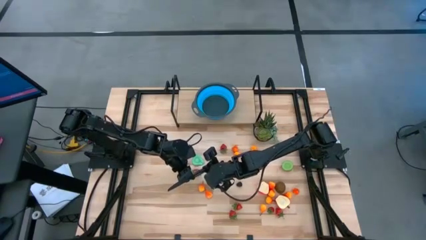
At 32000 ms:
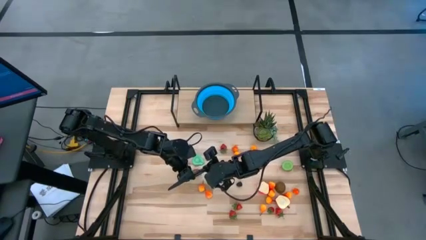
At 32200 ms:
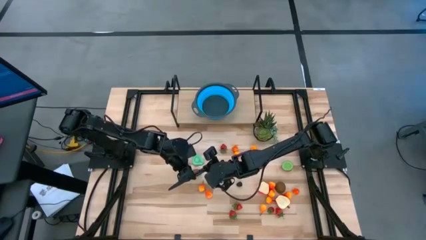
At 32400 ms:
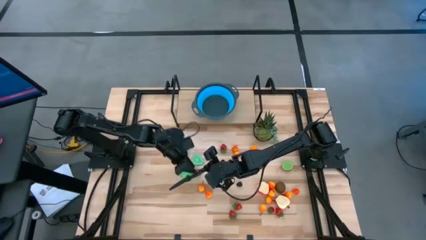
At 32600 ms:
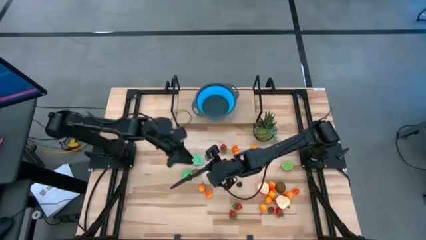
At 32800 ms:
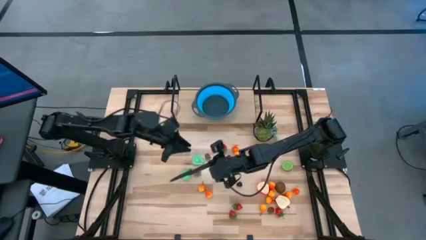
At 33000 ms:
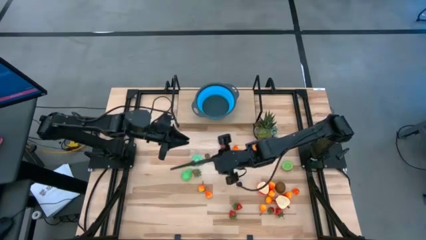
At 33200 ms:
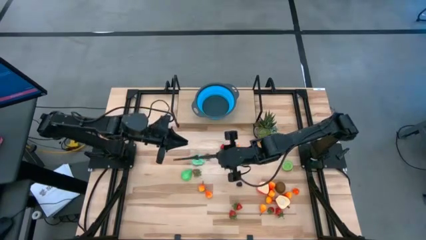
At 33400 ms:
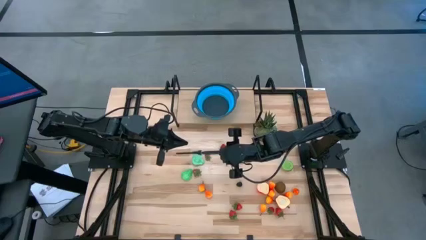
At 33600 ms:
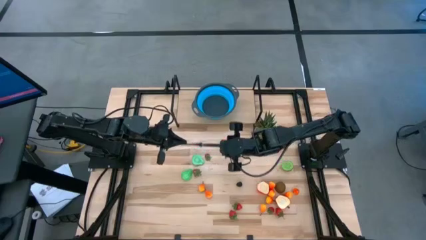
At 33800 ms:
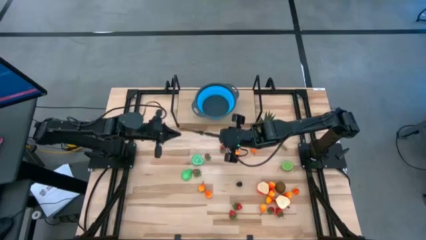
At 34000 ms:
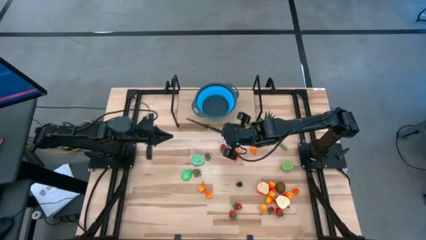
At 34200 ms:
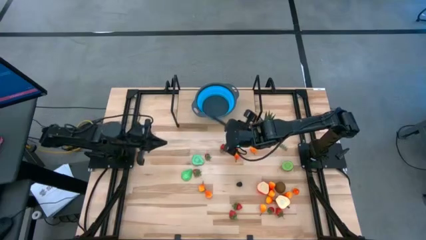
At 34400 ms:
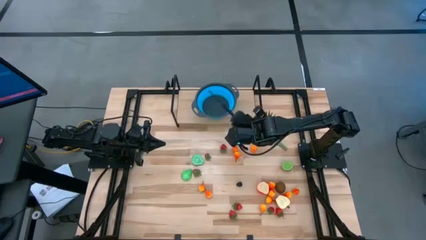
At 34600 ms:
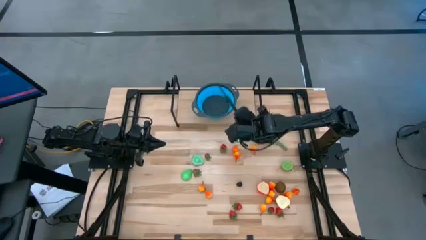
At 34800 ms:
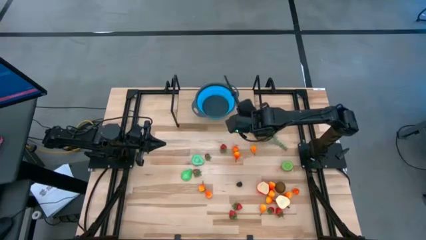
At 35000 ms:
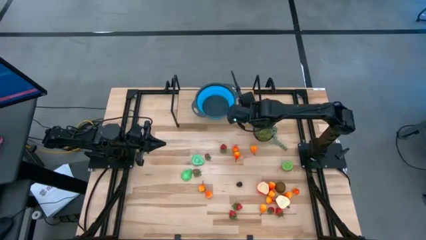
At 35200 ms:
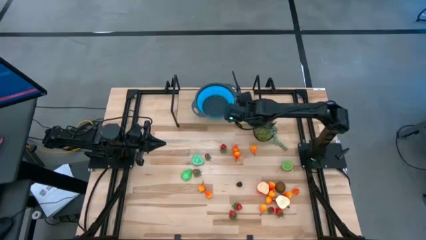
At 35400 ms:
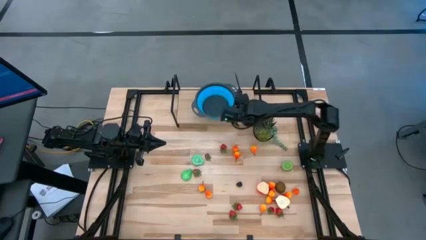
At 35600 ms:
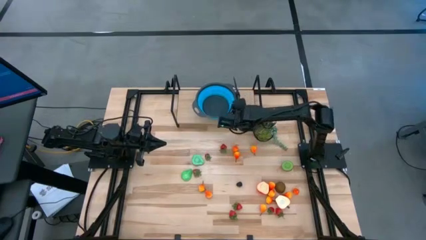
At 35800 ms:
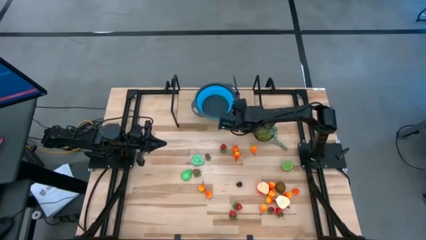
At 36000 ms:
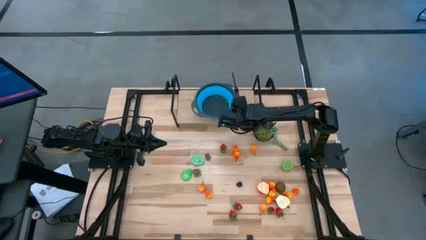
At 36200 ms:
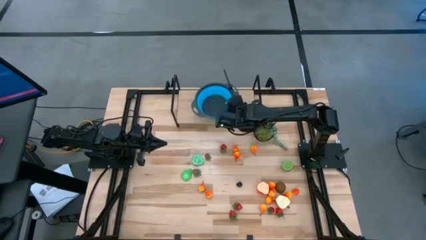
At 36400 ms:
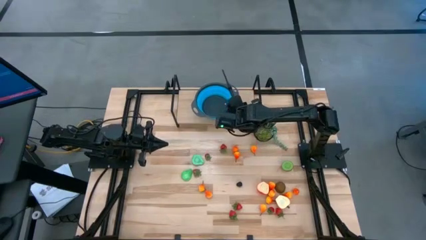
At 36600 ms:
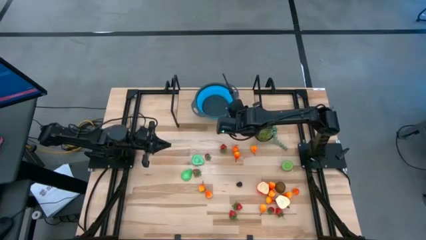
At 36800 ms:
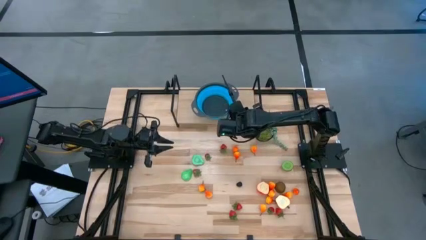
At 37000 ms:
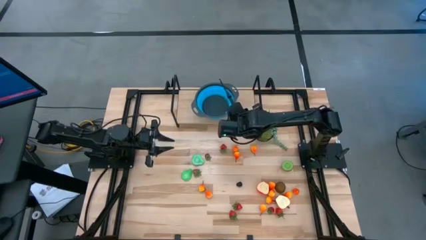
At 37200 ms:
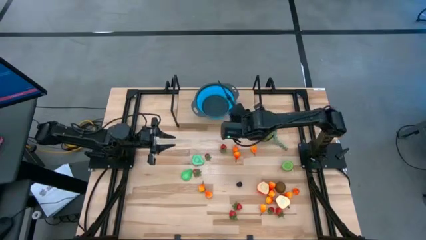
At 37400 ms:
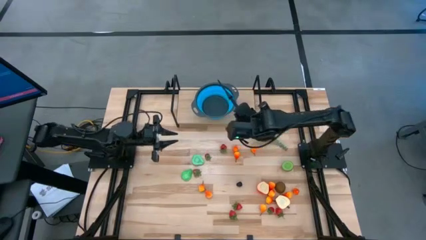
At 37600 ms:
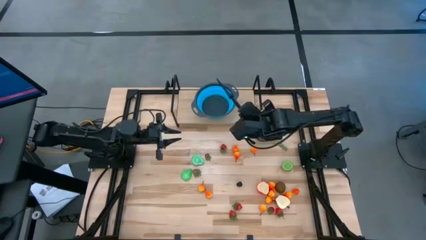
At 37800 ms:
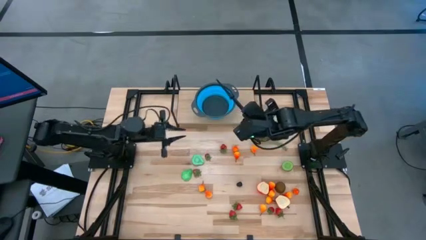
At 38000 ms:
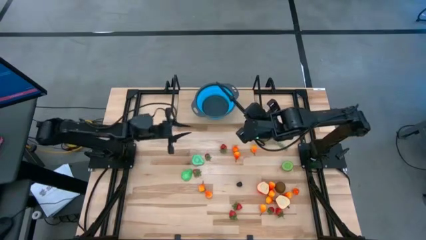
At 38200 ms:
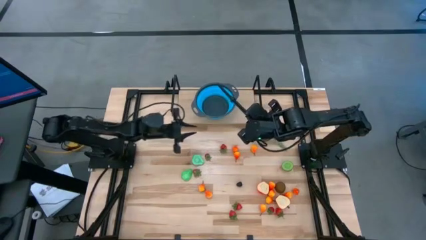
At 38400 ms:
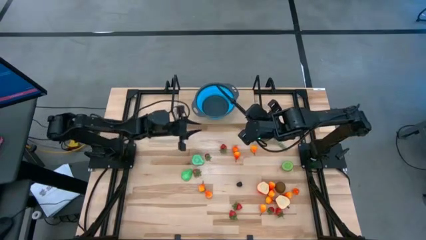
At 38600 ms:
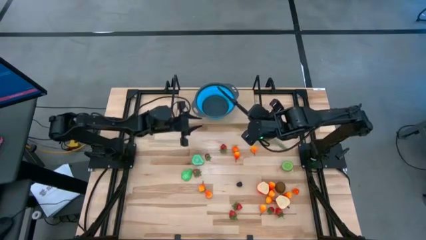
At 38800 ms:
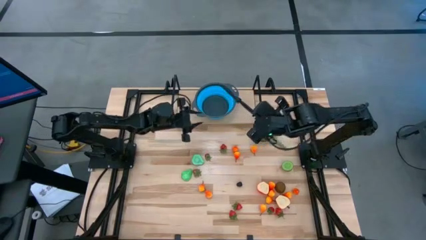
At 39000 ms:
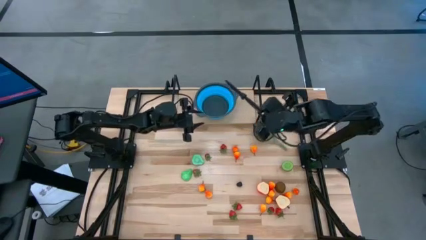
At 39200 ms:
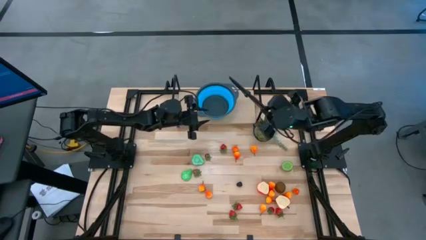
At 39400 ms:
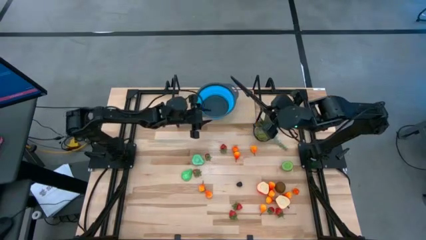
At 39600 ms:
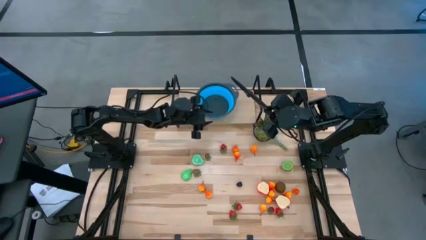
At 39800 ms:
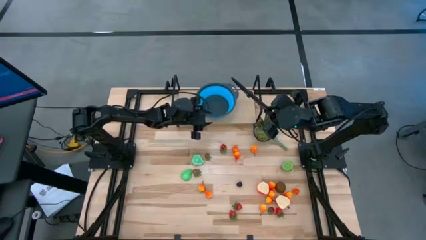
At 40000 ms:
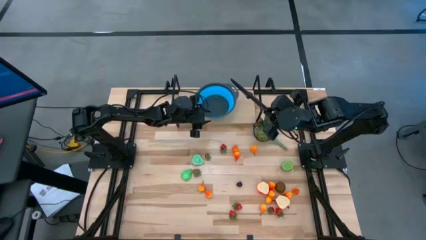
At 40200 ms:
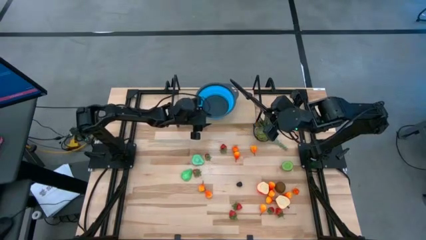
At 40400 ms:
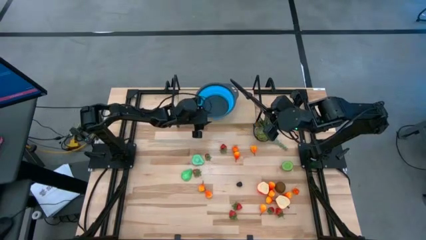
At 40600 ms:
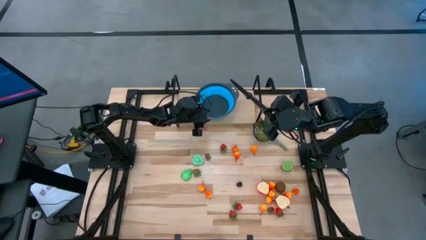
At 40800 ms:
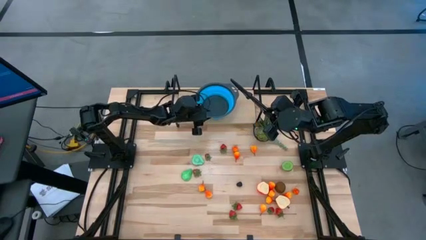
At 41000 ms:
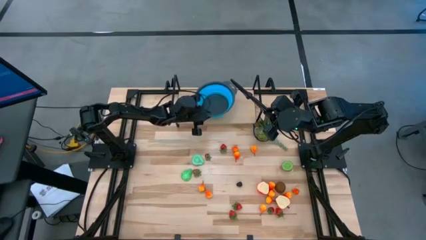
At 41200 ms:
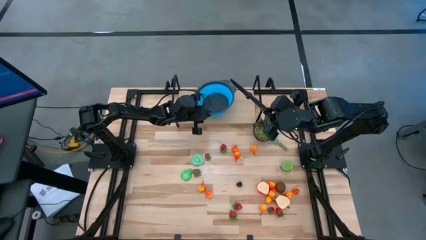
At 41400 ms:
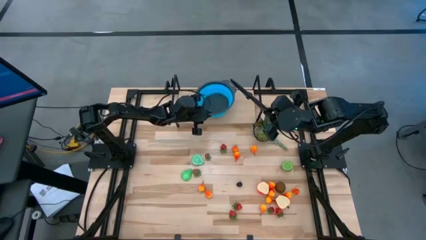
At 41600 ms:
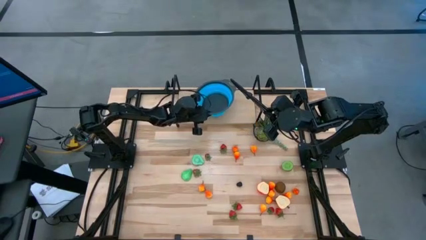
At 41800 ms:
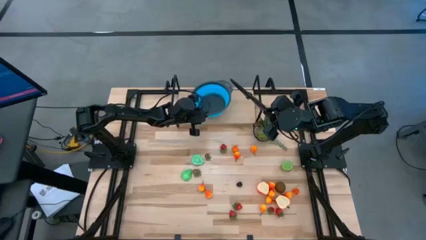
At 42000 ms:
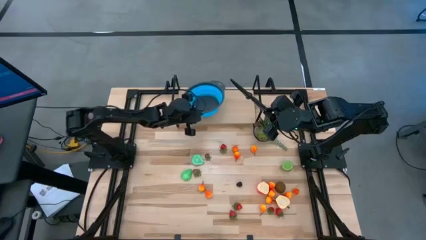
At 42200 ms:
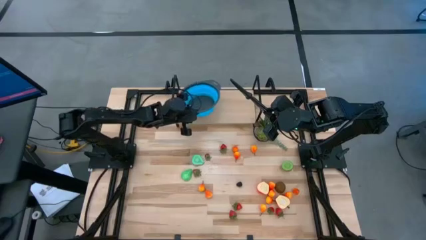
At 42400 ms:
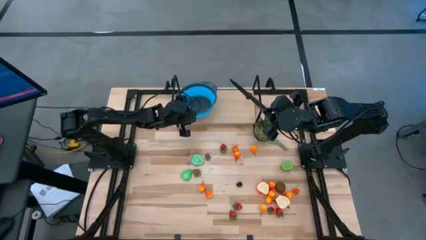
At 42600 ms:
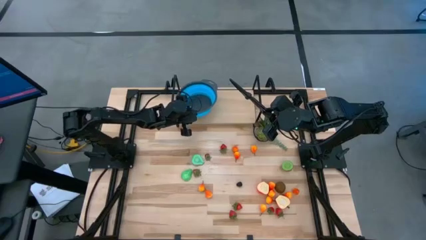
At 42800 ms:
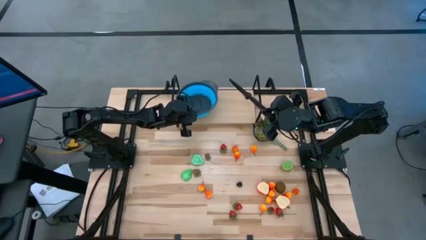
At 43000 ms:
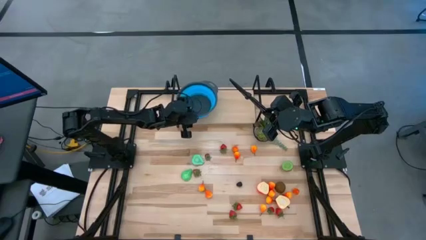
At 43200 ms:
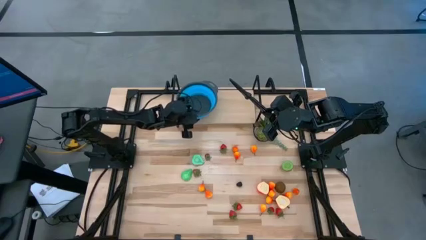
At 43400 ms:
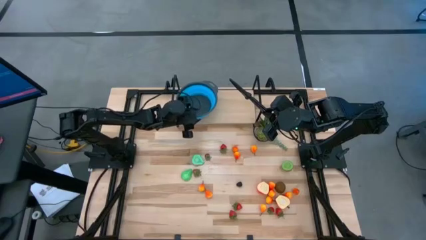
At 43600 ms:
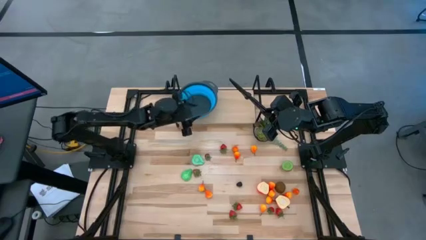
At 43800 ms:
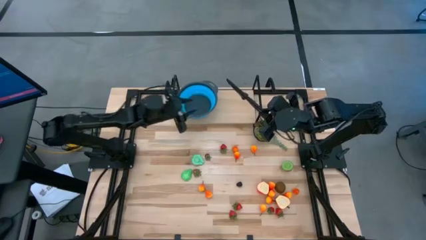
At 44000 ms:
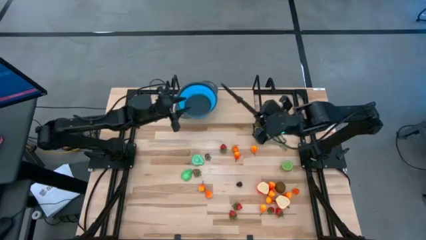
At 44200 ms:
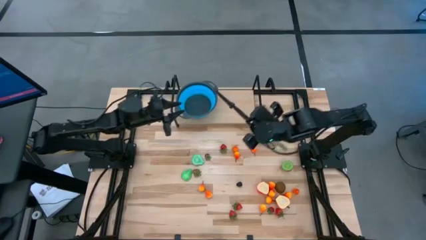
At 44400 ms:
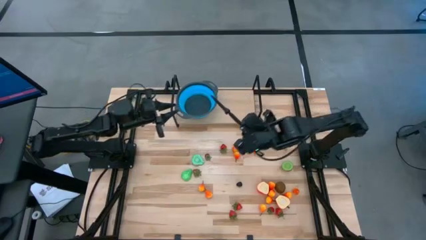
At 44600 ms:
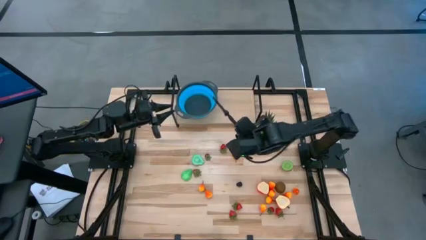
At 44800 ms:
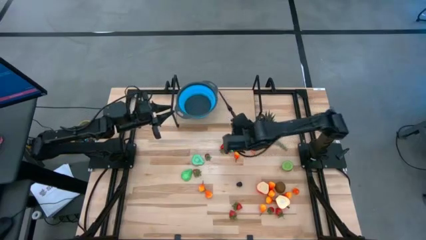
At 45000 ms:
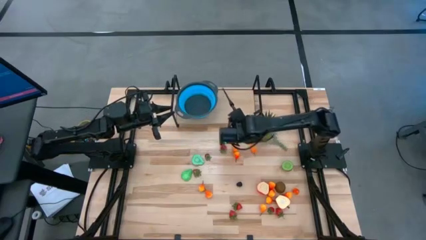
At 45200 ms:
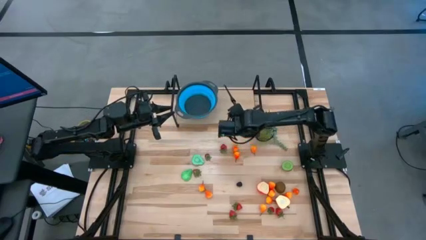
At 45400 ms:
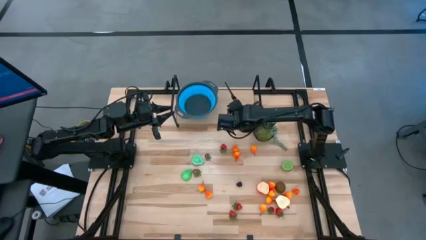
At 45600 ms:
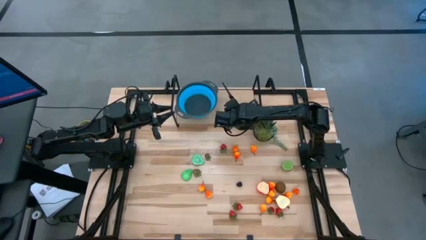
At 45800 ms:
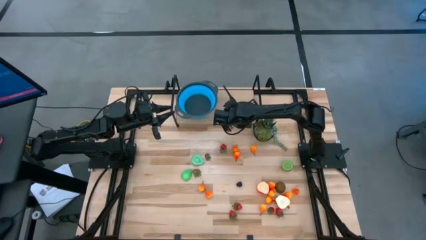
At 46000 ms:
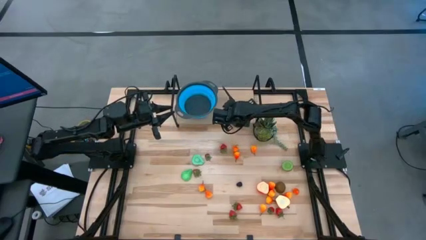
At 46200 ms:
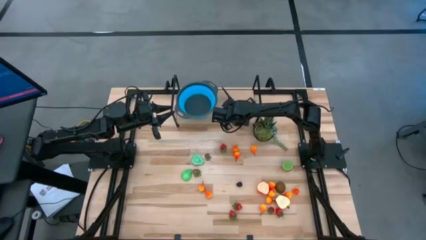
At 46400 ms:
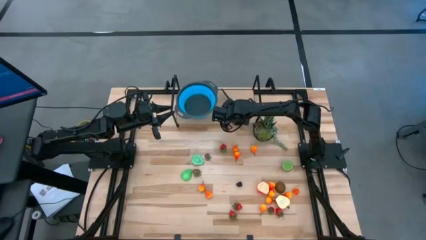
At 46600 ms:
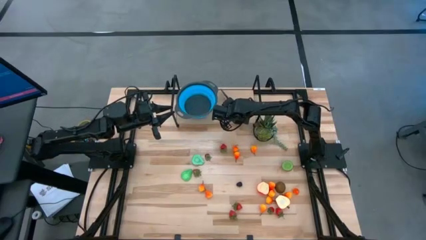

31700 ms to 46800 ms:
Task: Pick & Place Fruit
Put the knife on the shelf

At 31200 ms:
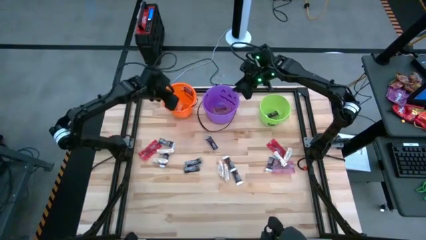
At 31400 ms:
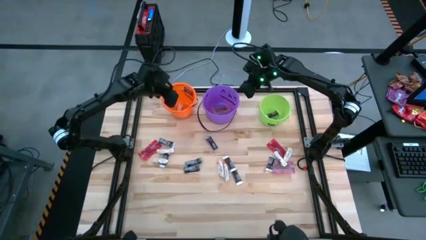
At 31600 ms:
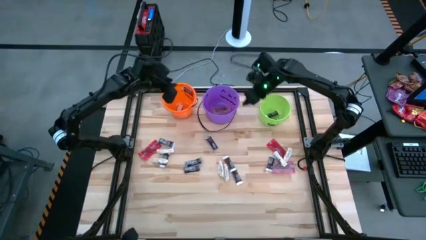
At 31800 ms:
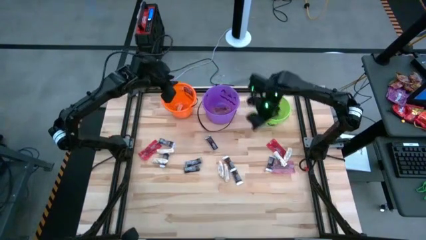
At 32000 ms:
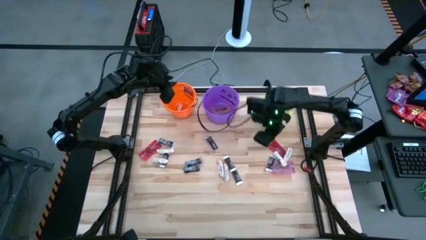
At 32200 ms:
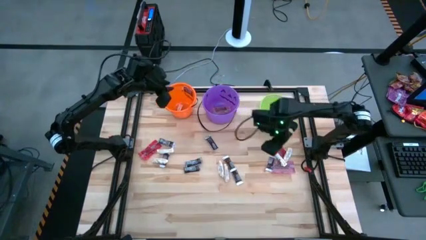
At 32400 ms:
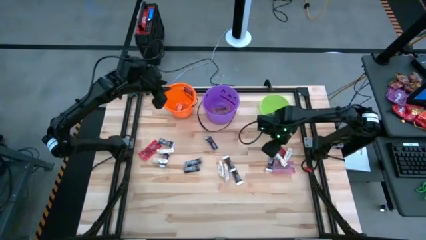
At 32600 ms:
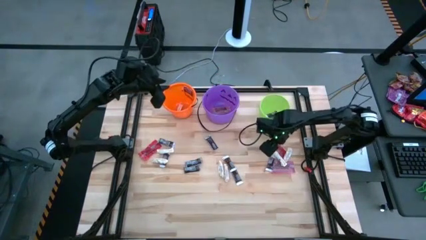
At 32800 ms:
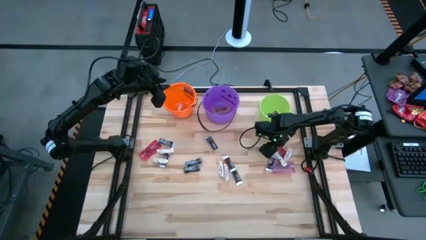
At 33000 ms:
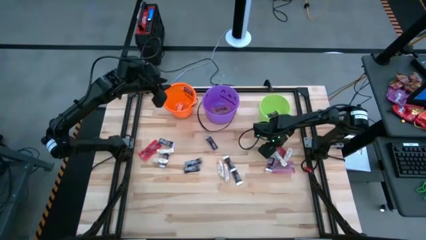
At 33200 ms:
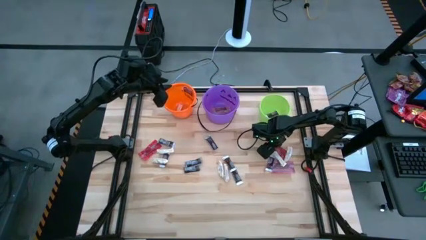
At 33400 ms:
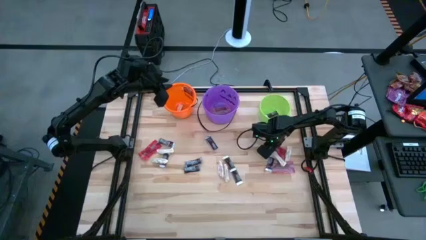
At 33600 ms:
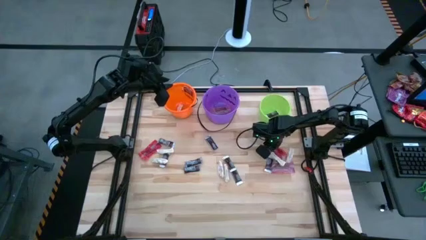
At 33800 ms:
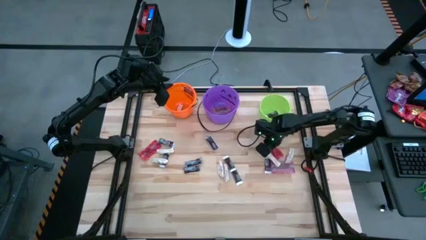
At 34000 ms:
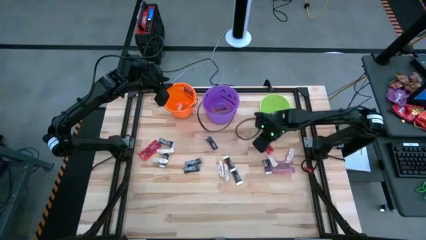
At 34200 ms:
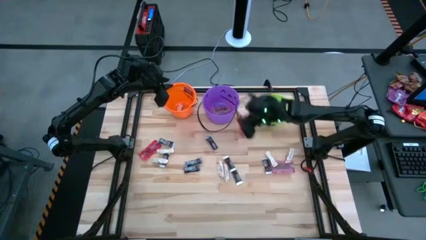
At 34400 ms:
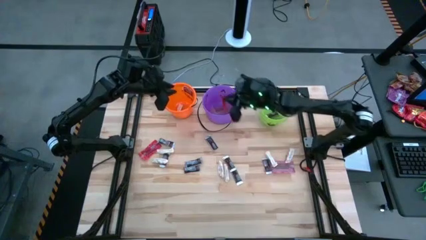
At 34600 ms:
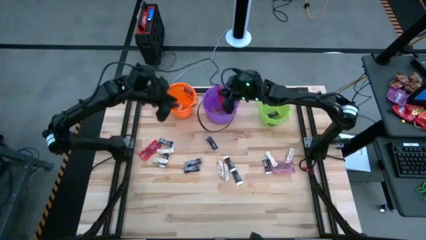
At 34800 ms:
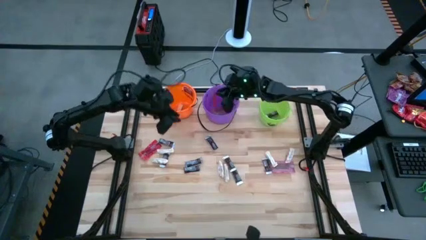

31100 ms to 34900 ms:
Task: Sort candy by brand, put in halloween buckets
Put the red candy pack into the purple bucket
